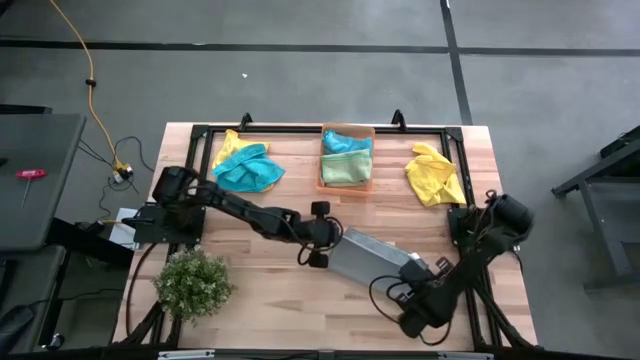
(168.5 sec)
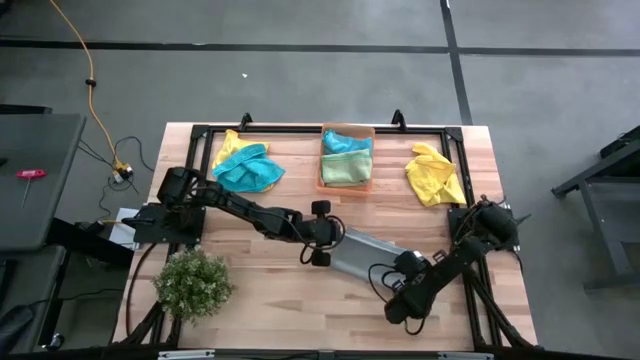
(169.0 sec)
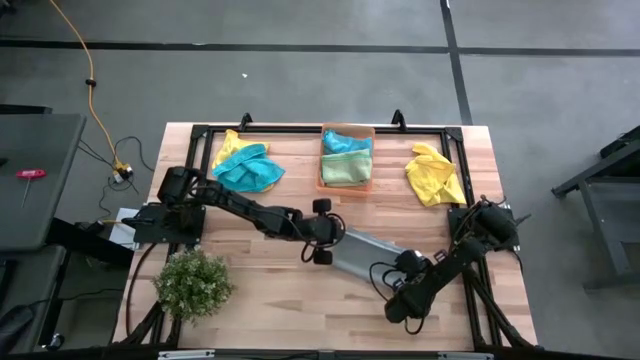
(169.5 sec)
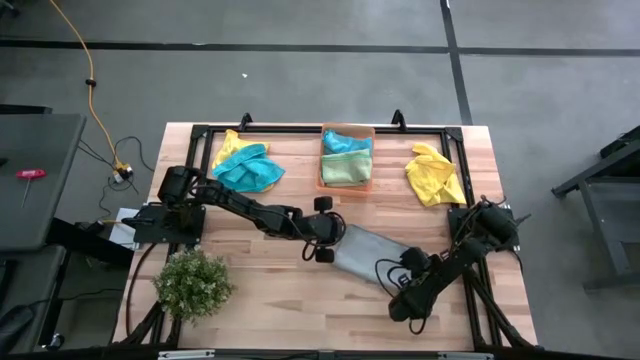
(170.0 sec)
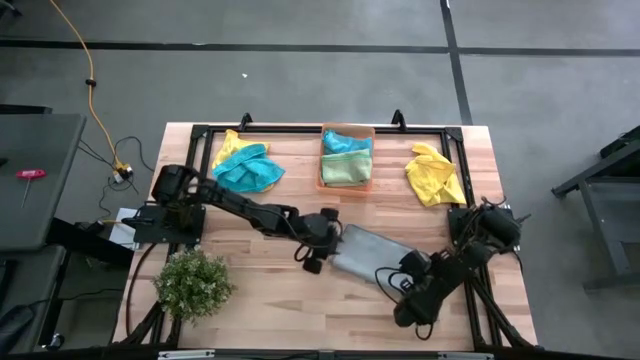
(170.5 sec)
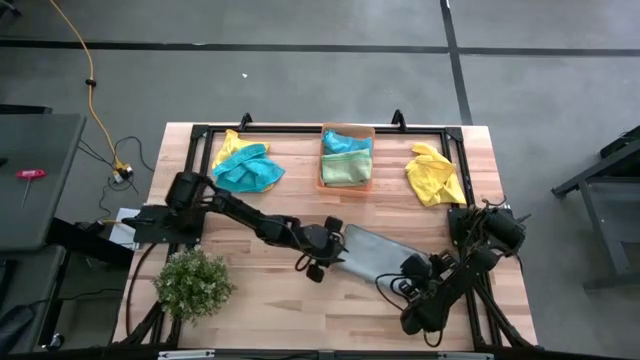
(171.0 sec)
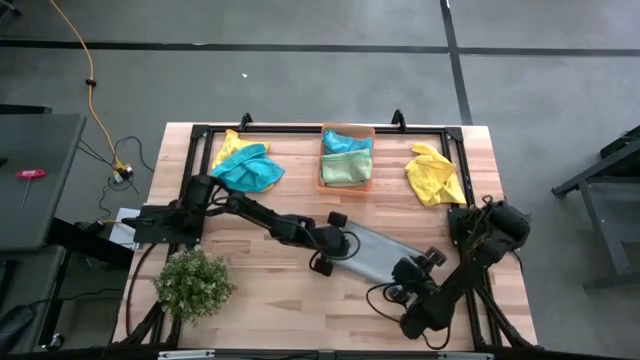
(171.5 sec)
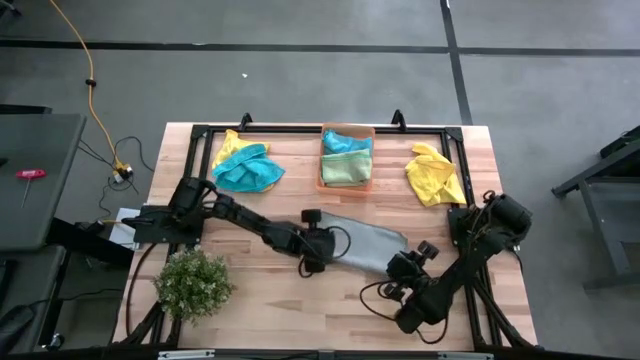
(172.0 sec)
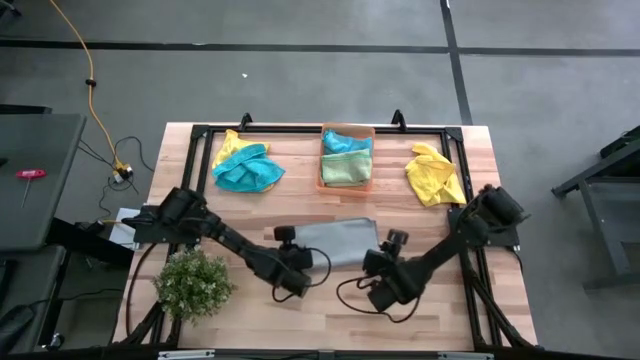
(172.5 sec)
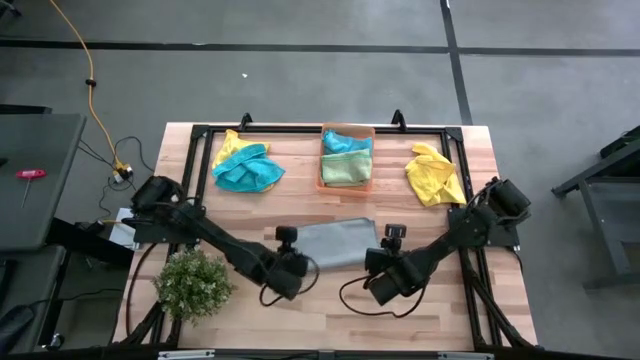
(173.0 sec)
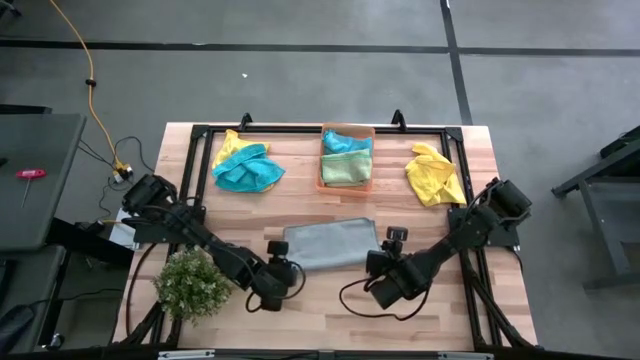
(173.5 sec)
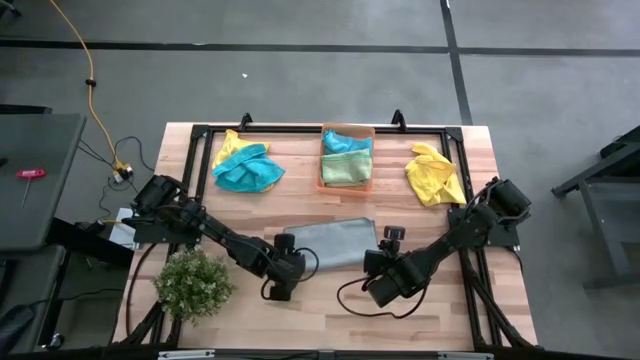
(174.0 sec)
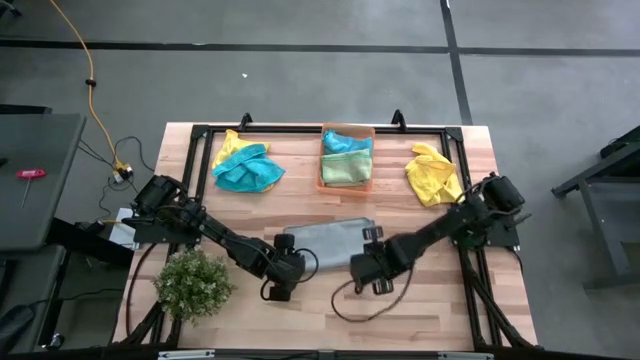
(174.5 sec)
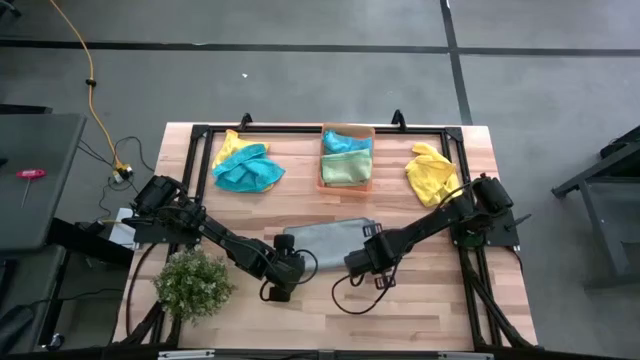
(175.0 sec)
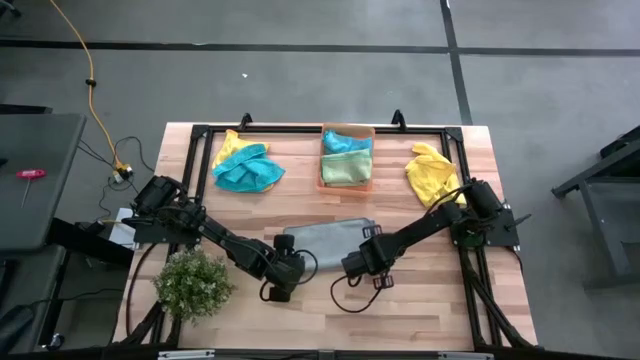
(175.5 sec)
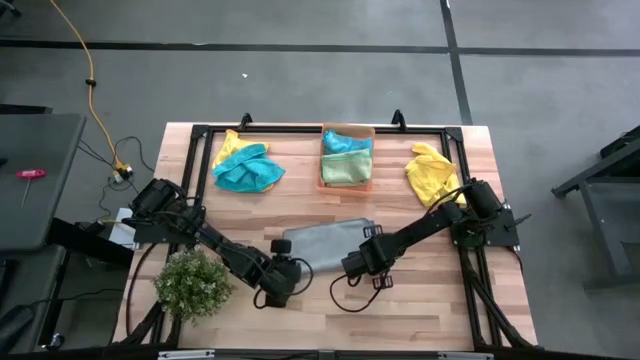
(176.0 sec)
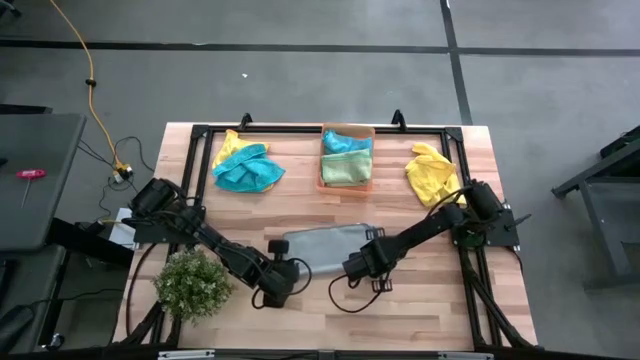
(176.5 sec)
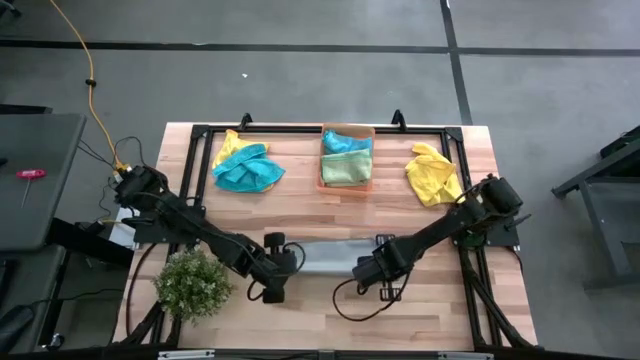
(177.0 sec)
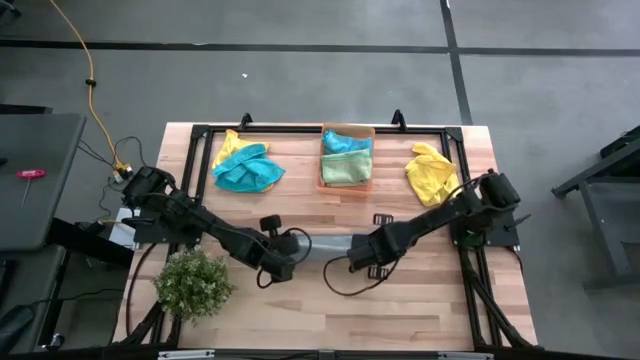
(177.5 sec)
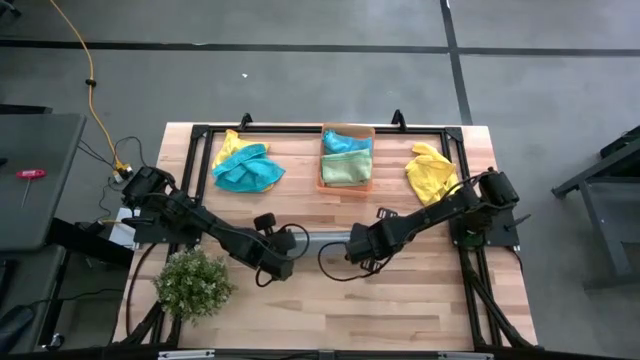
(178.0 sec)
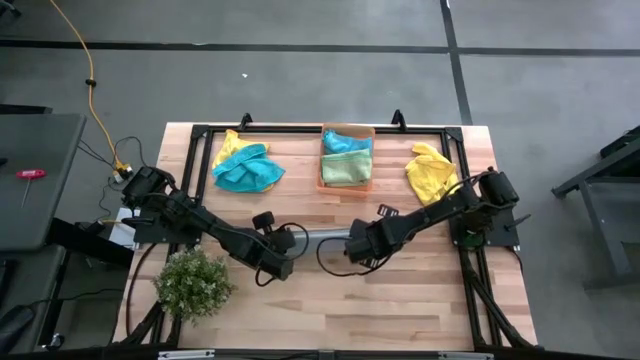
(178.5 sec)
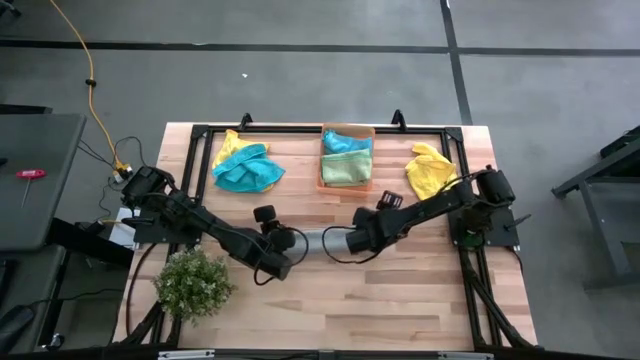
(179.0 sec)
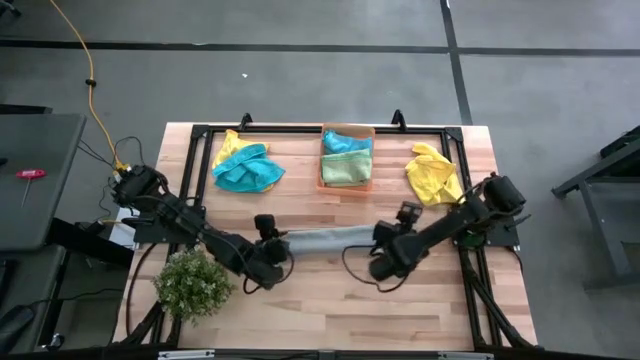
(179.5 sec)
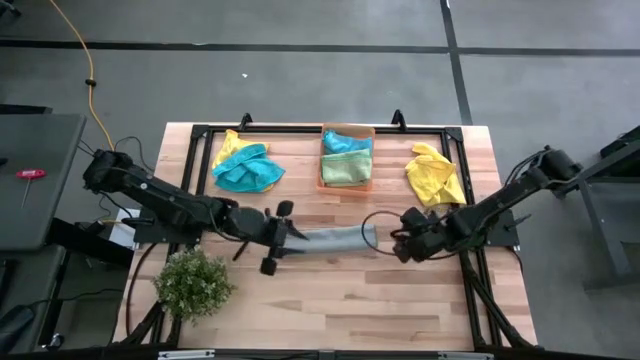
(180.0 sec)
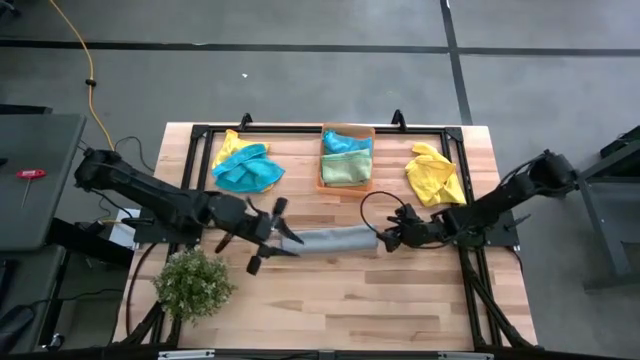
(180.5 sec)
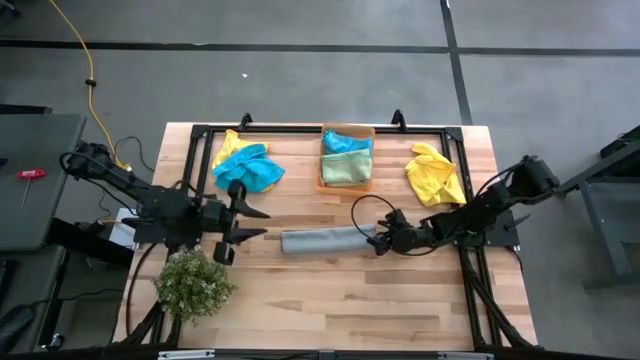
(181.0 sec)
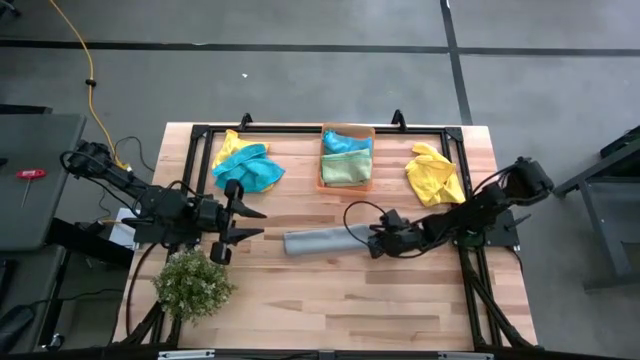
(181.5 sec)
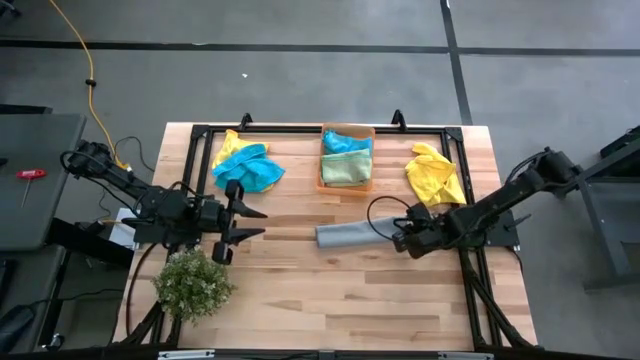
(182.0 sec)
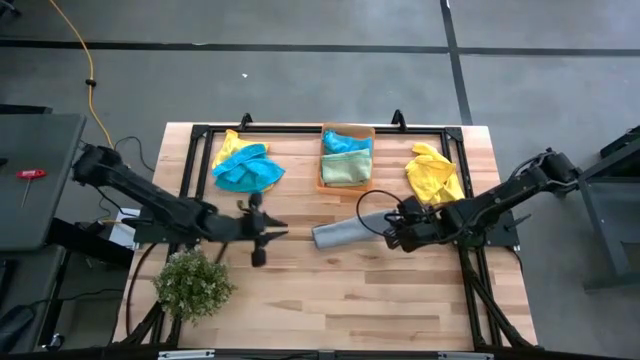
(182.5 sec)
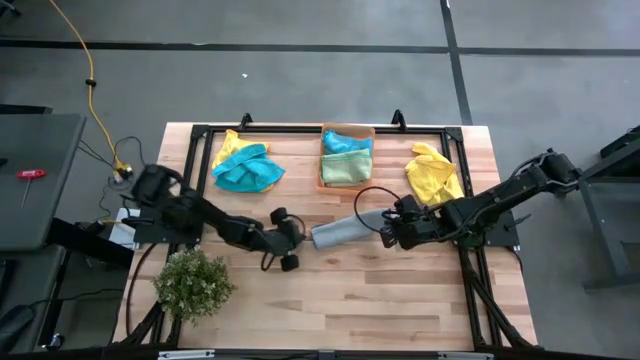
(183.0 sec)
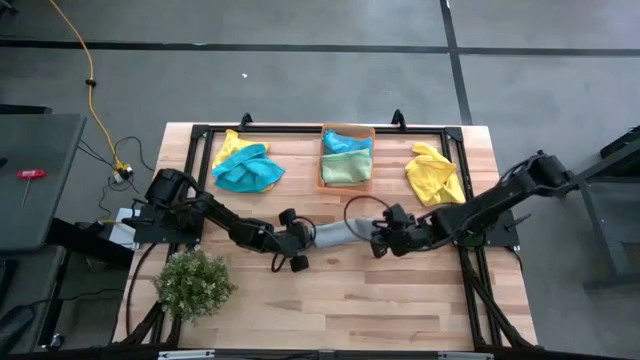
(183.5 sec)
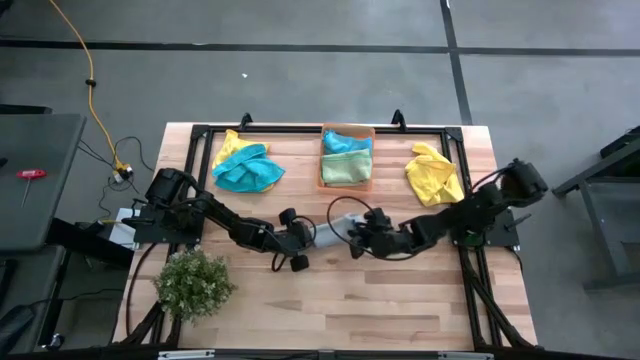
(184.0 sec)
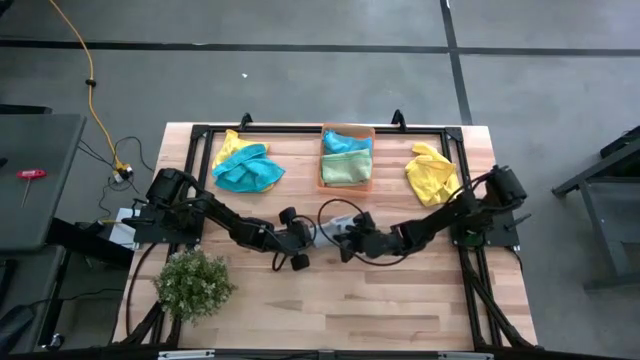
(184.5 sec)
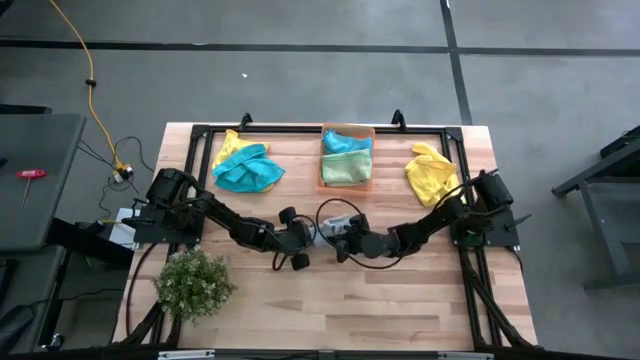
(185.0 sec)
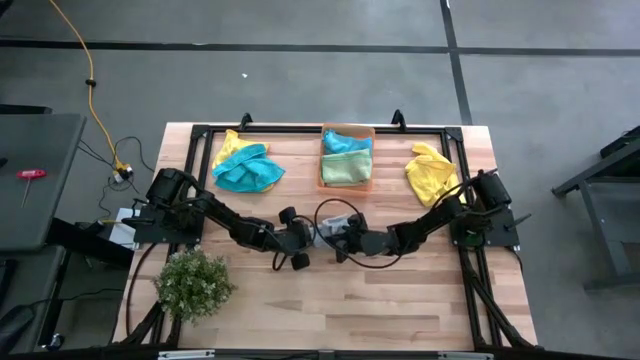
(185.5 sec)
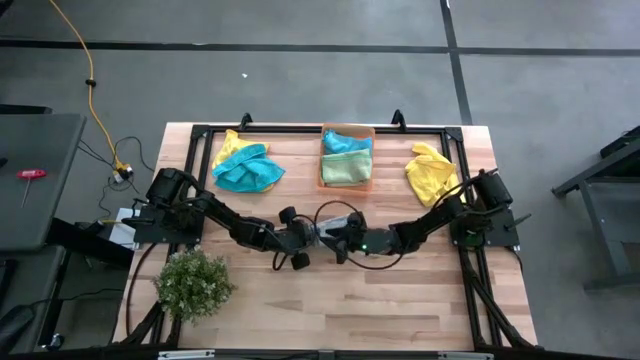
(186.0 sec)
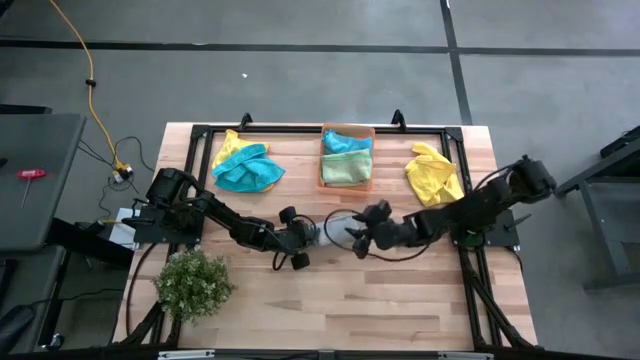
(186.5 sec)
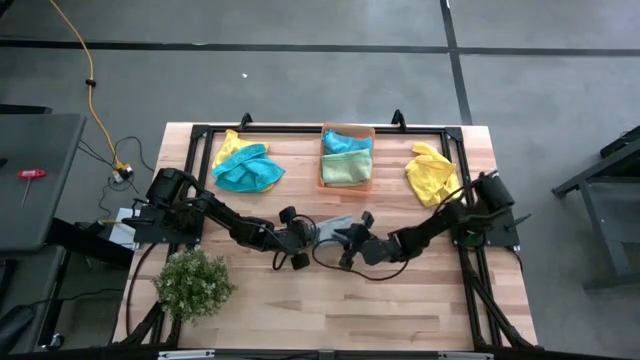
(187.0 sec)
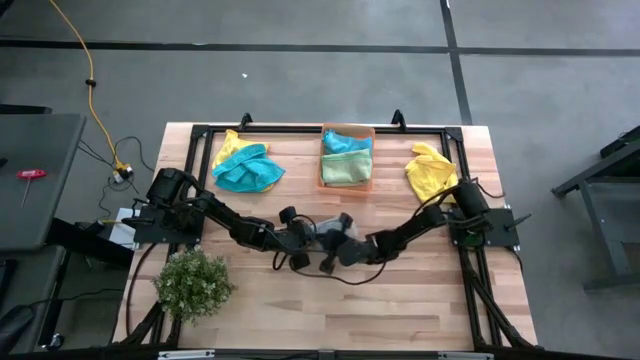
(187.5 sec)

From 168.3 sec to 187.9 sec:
Task: Fold microfiber towels
Fold the gray microfiber cloth
